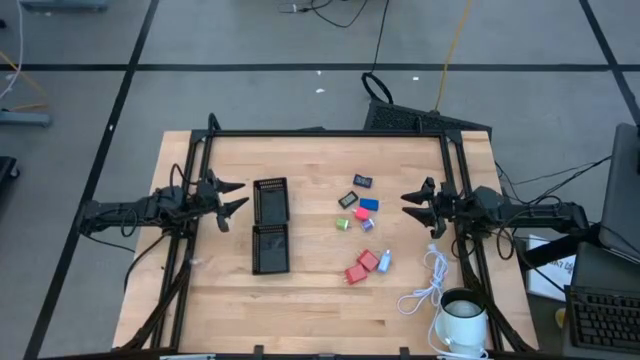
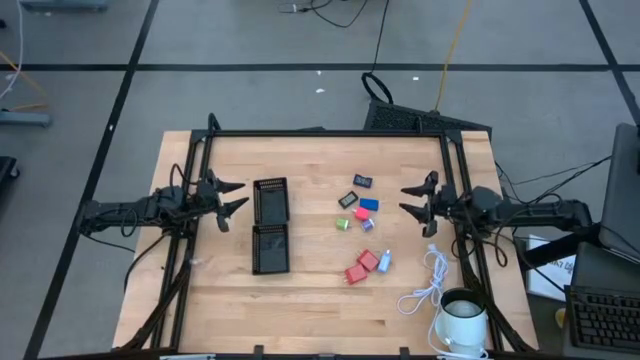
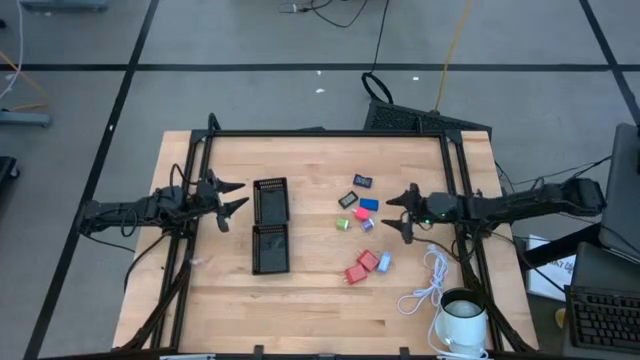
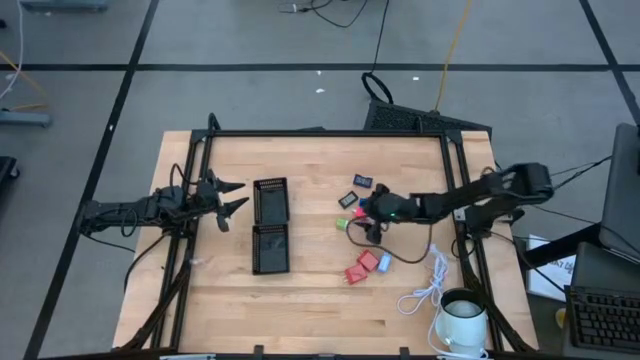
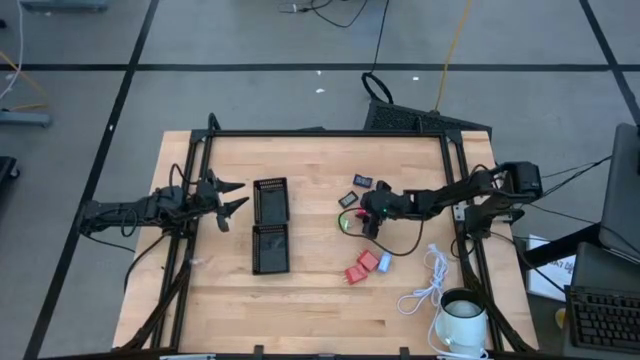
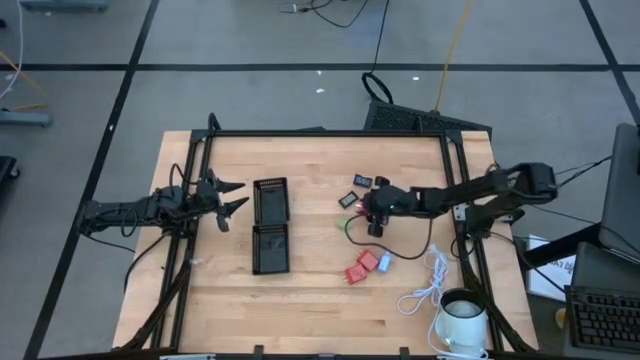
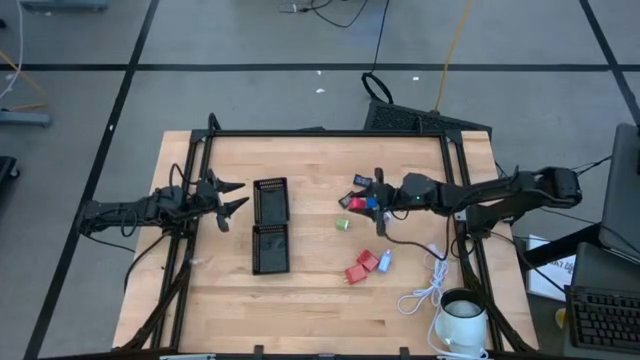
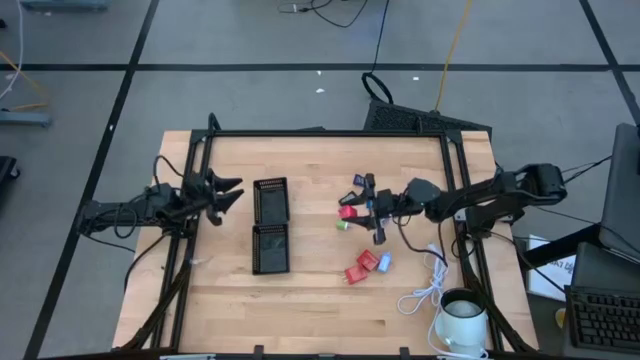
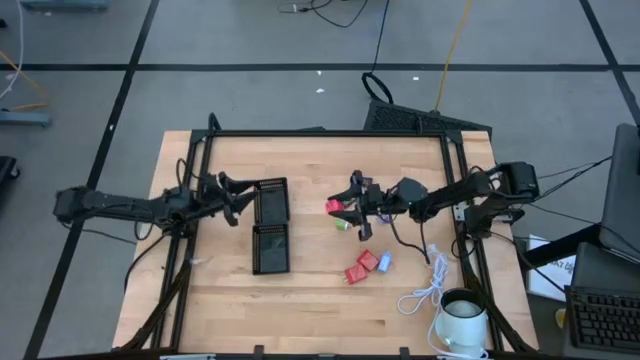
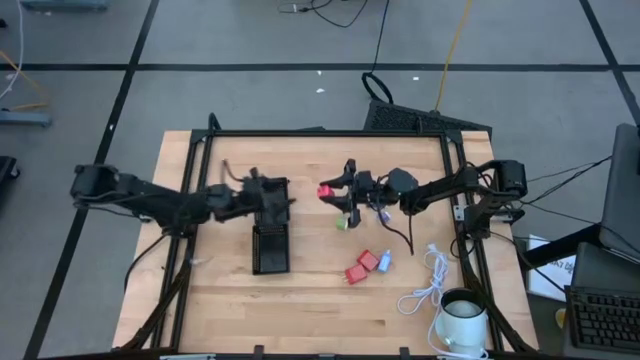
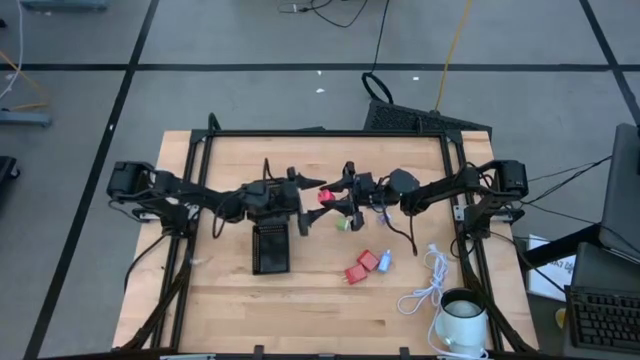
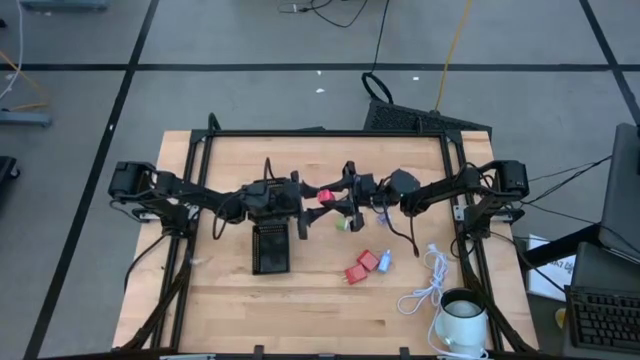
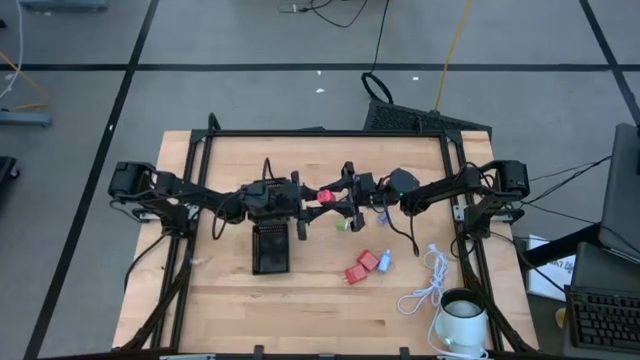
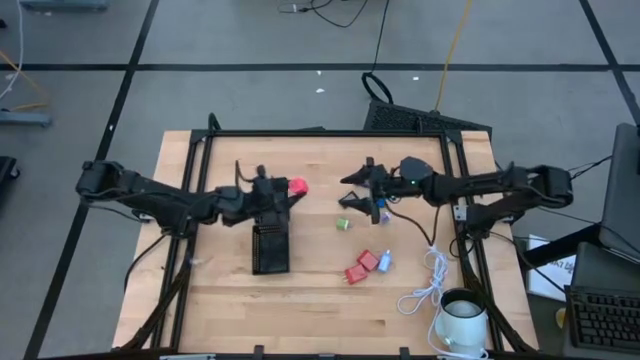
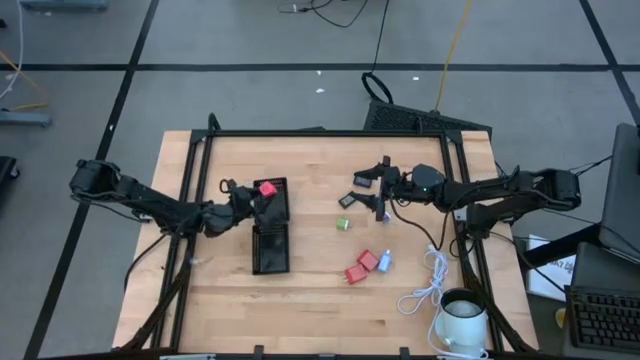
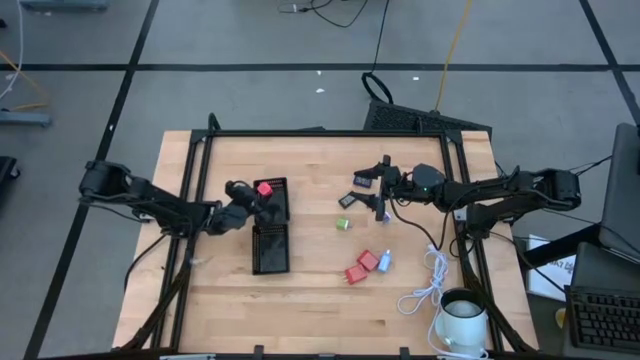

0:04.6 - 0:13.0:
Task: Pick & Place Office items
Put the pink charger adapter into the top black bin

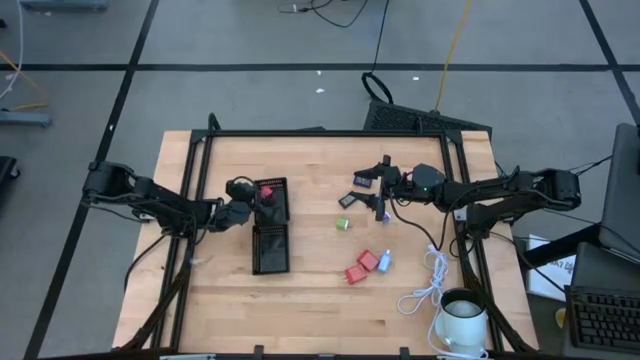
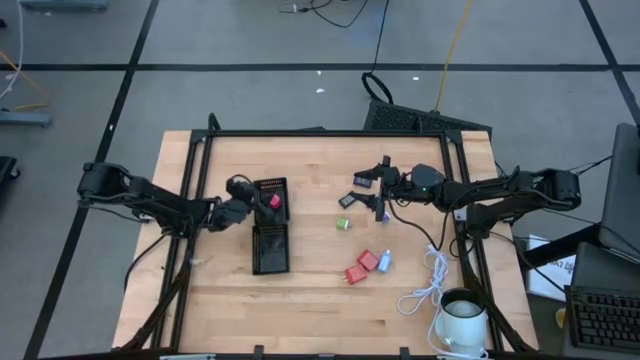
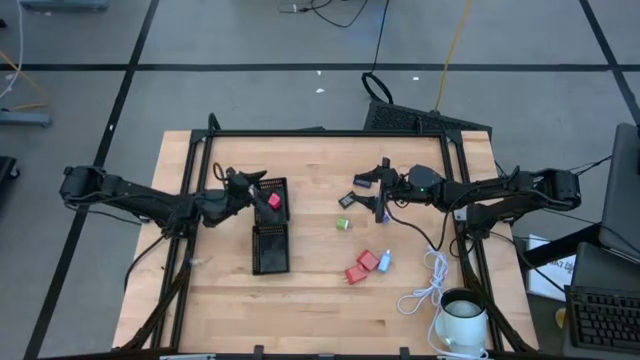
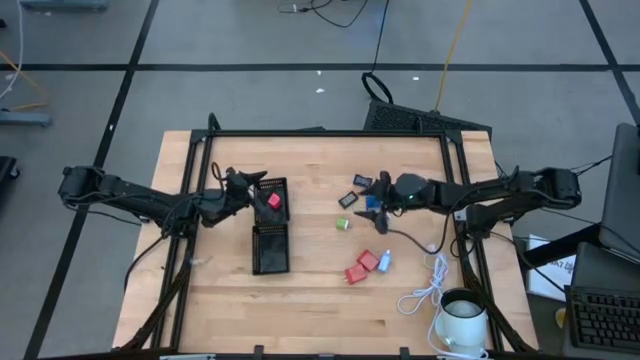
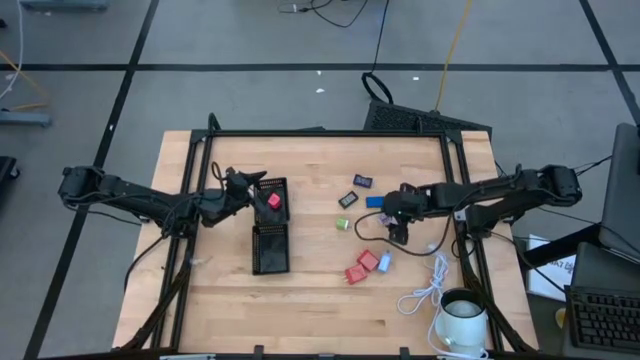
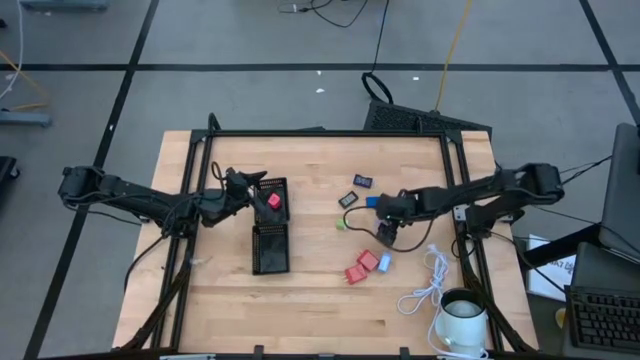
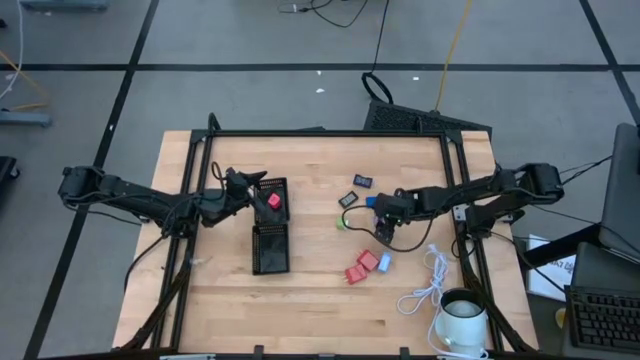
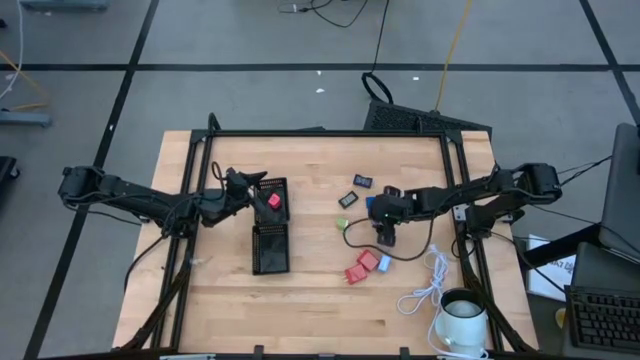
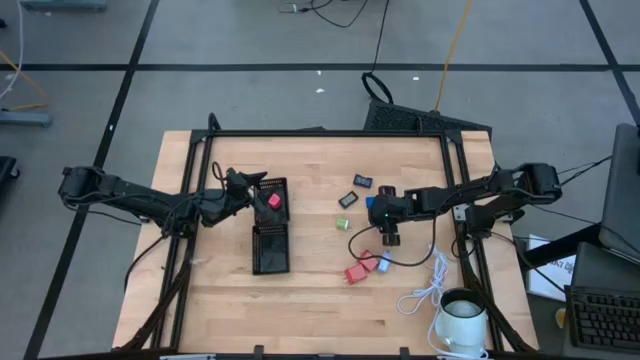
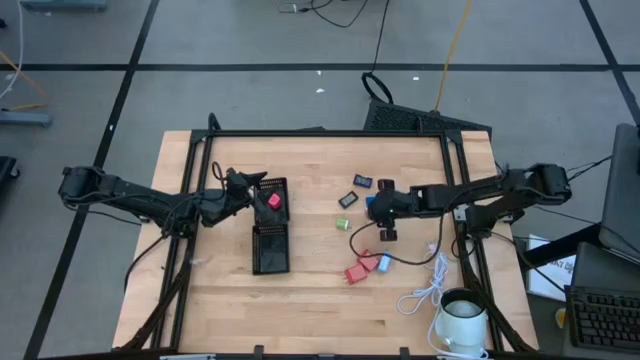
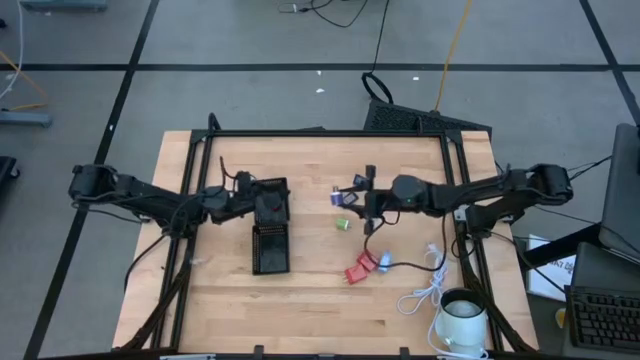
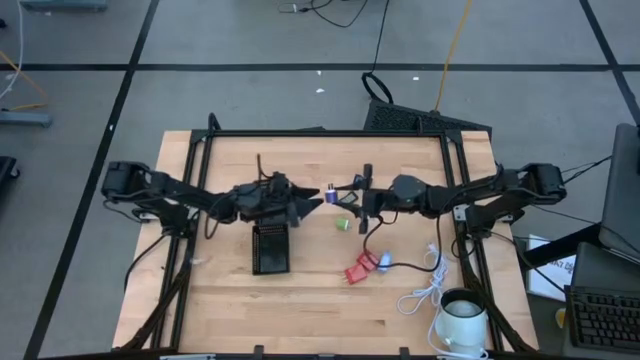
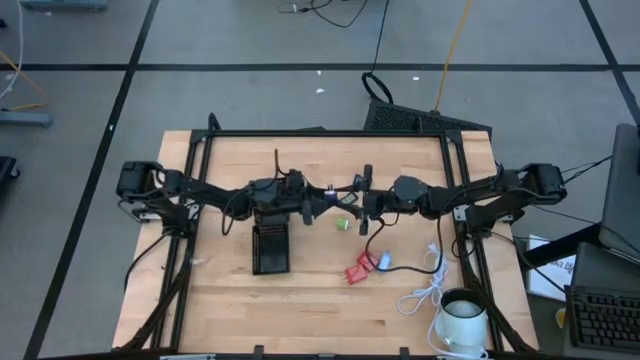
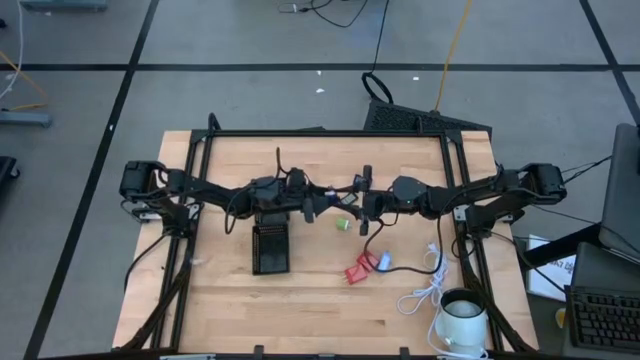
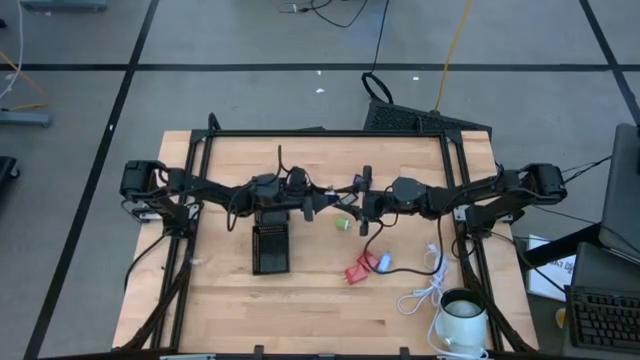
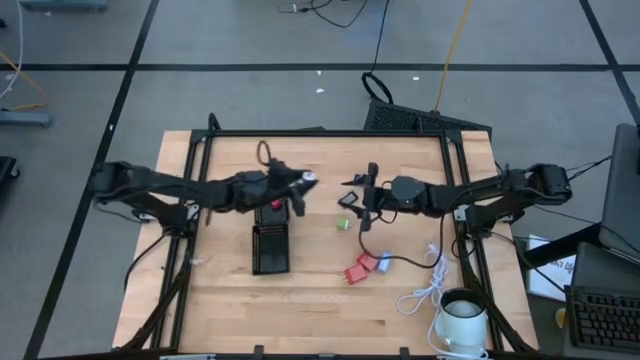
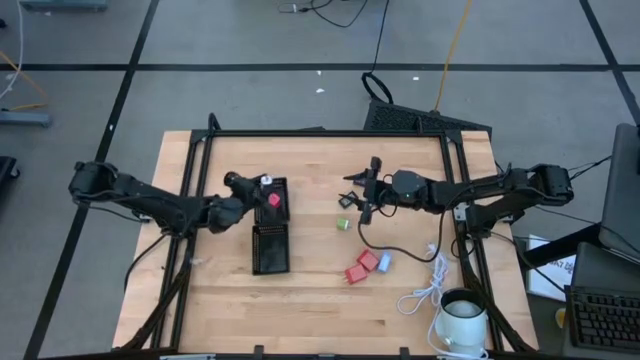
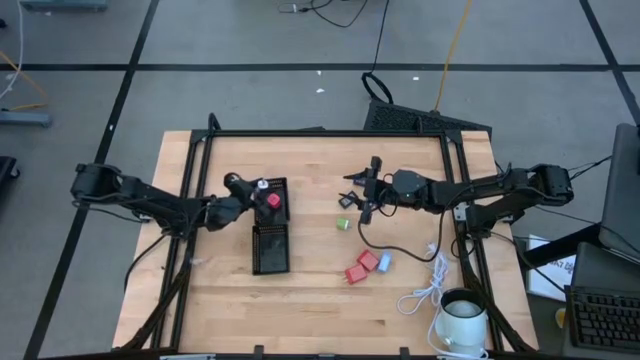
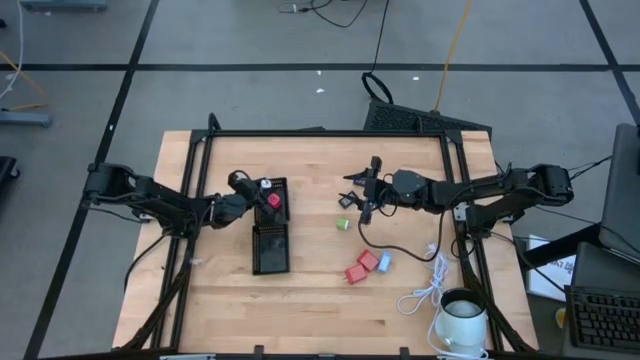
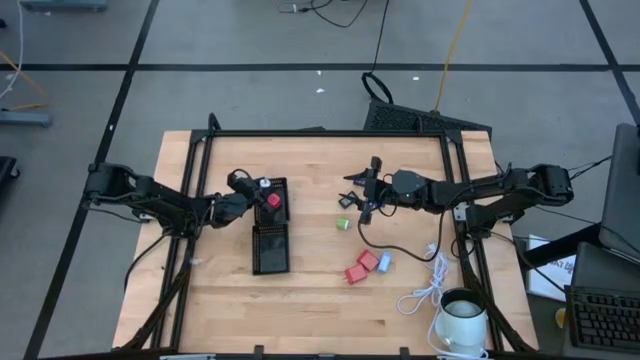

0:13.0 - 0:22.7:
Put the violet white charger adapter into the top black bin

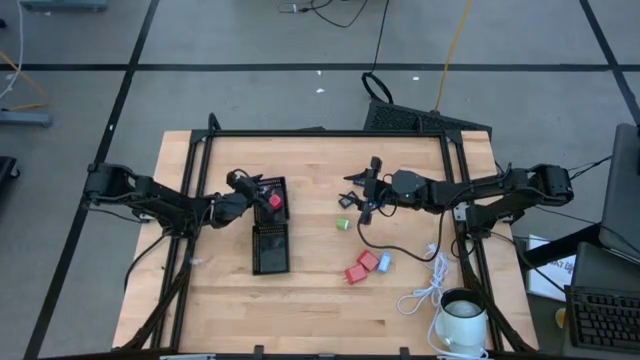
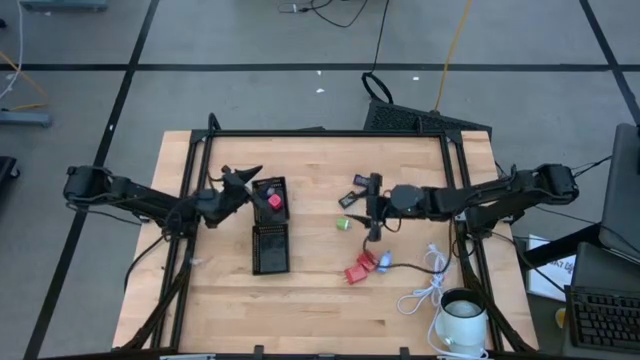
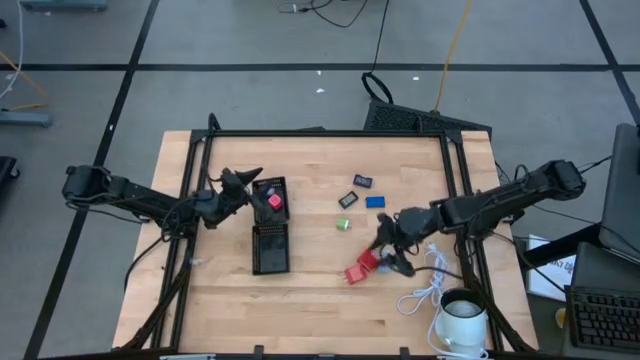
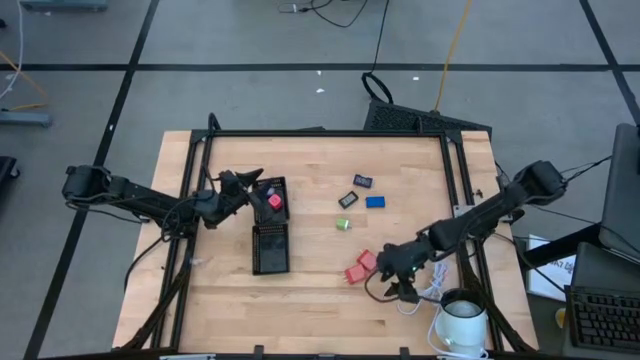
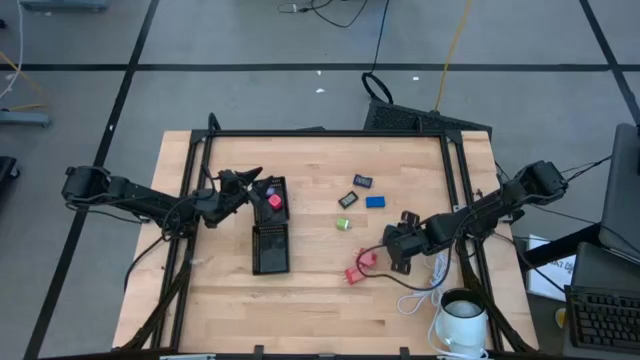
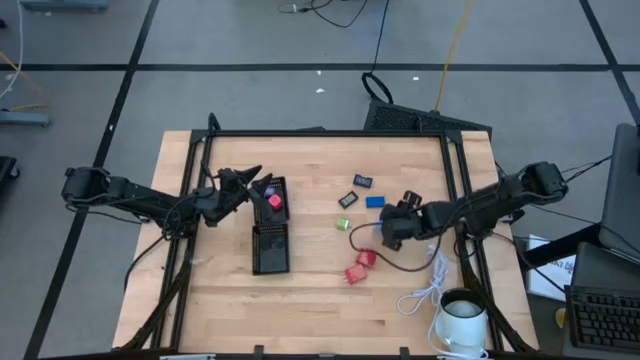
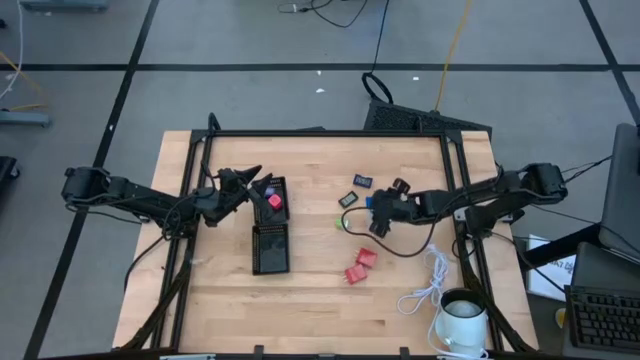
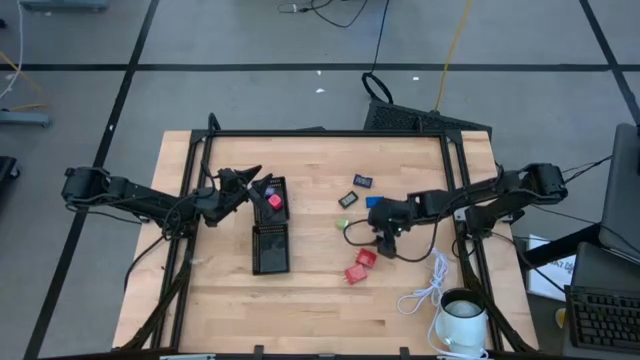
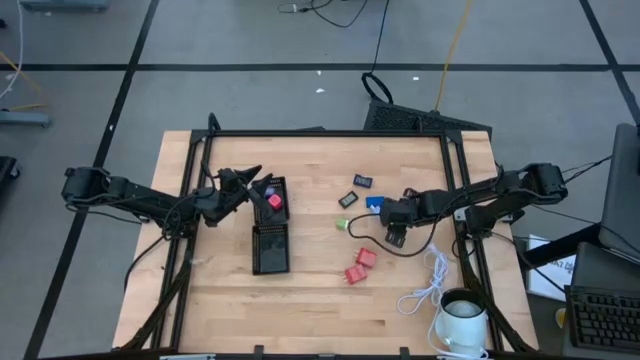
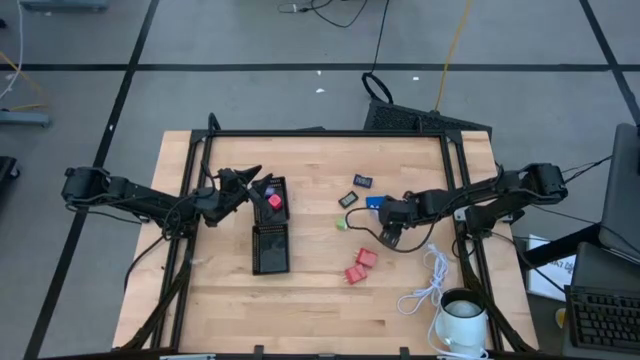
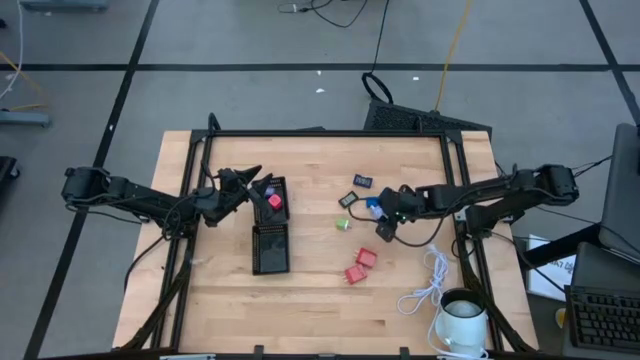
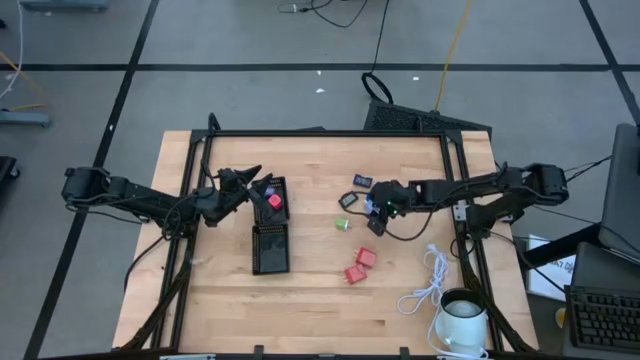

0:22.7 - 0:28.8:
Put the light blue charger adapter into the top black bin
